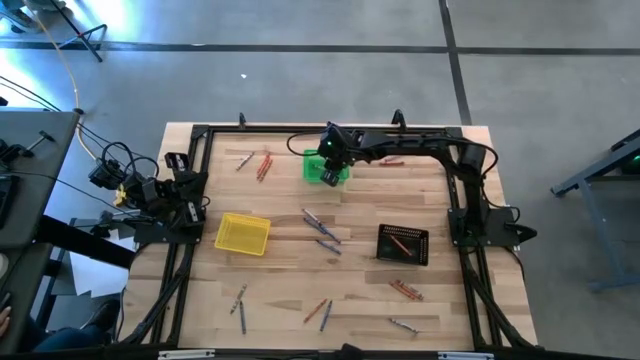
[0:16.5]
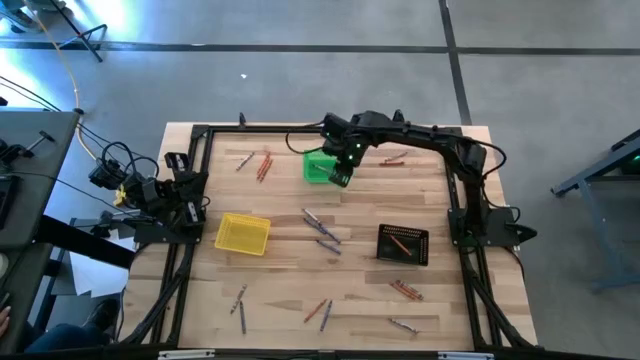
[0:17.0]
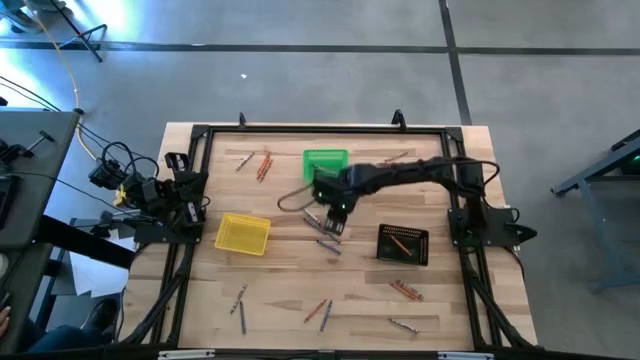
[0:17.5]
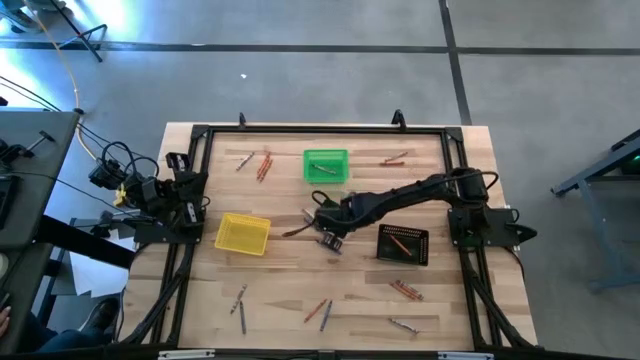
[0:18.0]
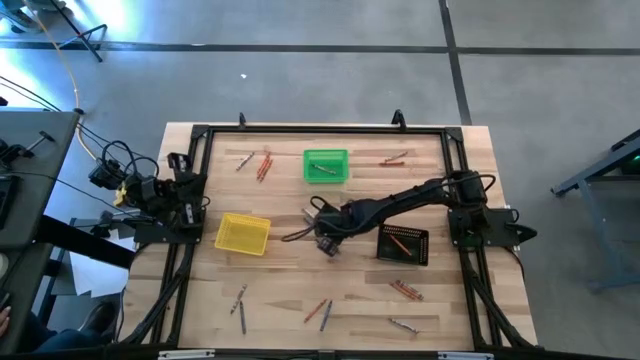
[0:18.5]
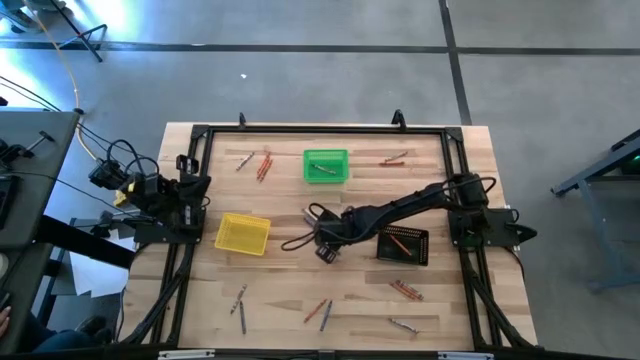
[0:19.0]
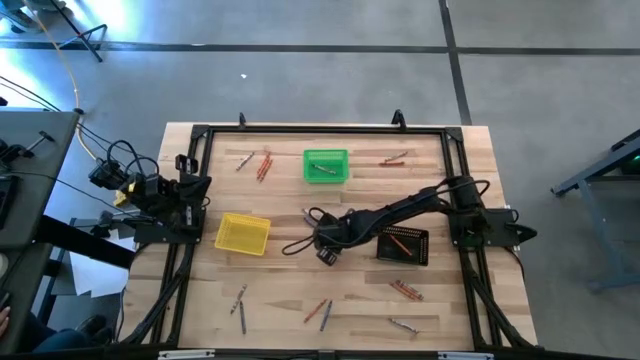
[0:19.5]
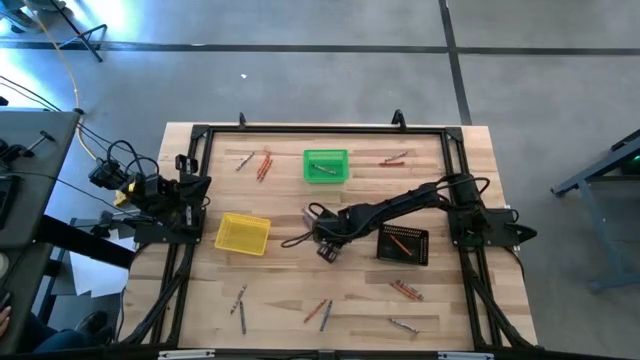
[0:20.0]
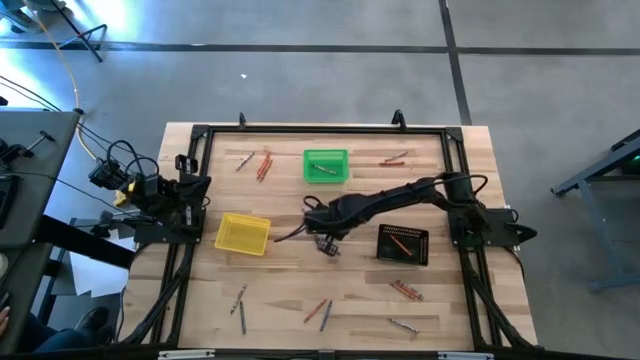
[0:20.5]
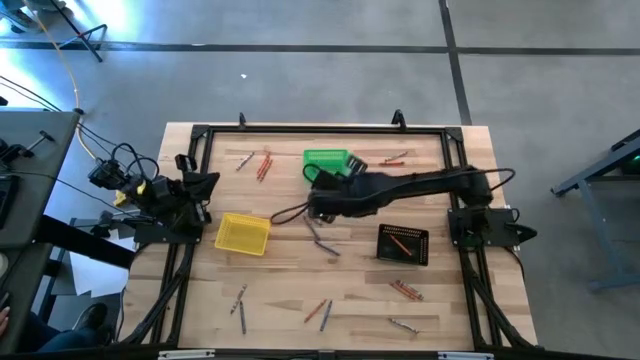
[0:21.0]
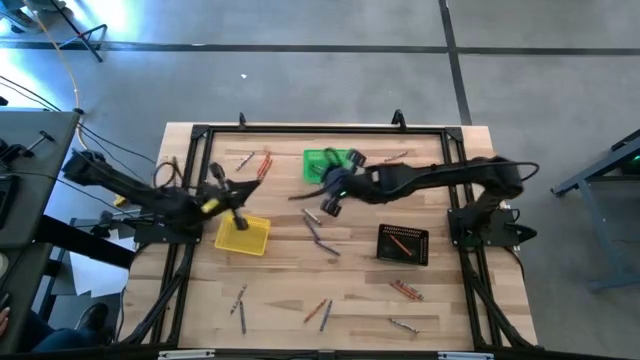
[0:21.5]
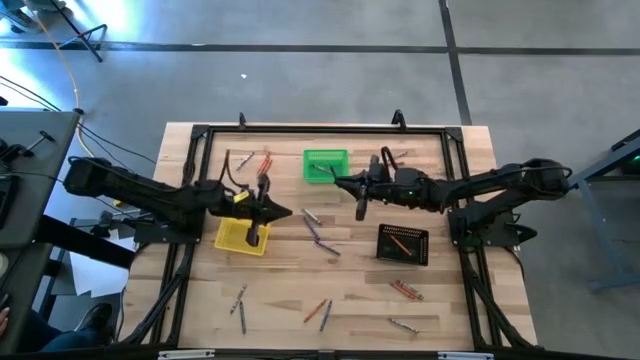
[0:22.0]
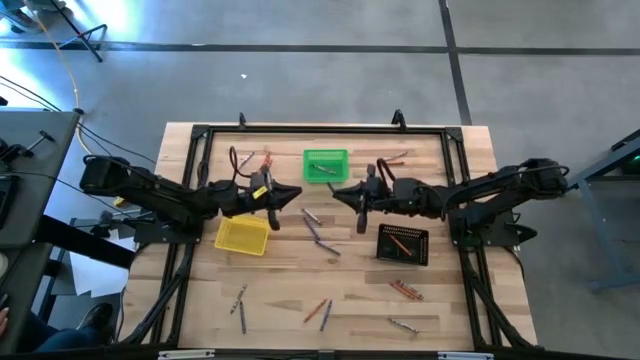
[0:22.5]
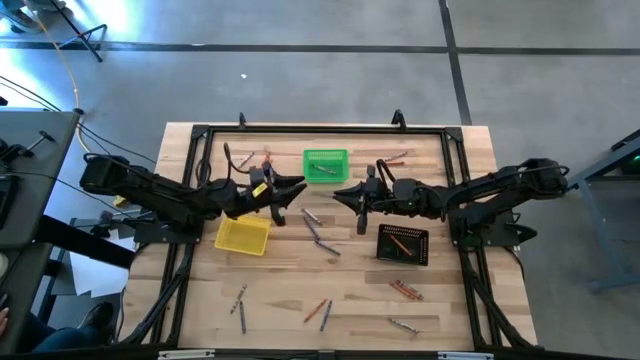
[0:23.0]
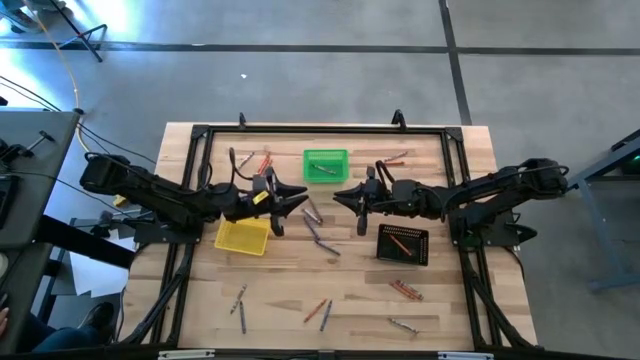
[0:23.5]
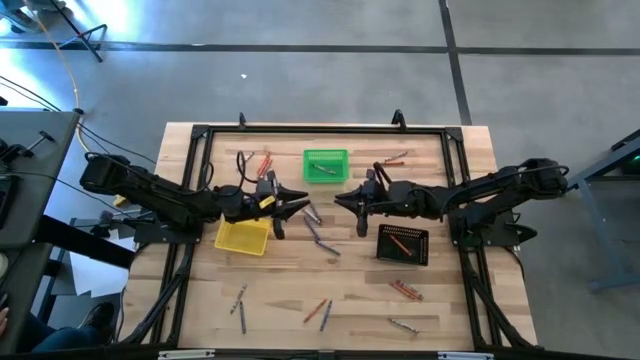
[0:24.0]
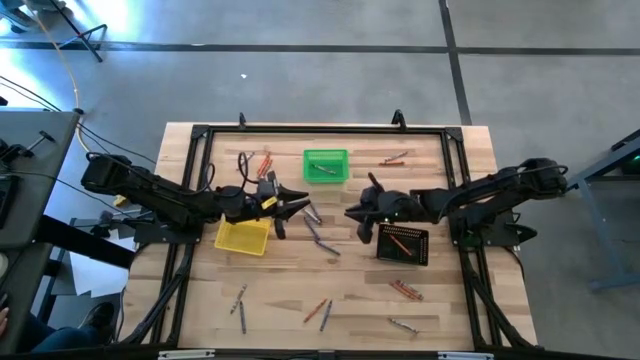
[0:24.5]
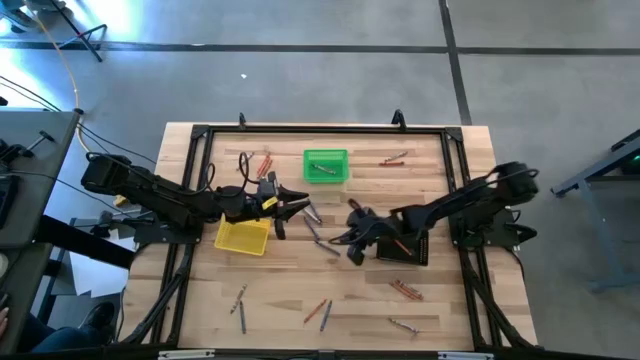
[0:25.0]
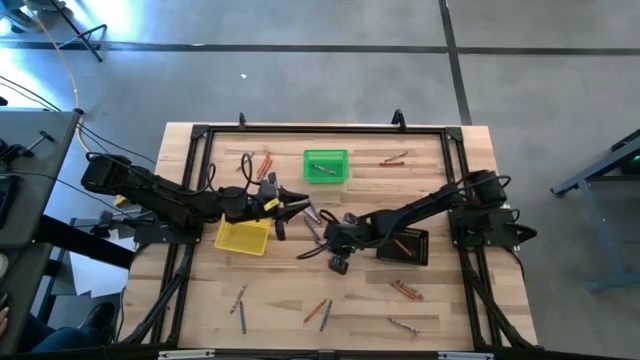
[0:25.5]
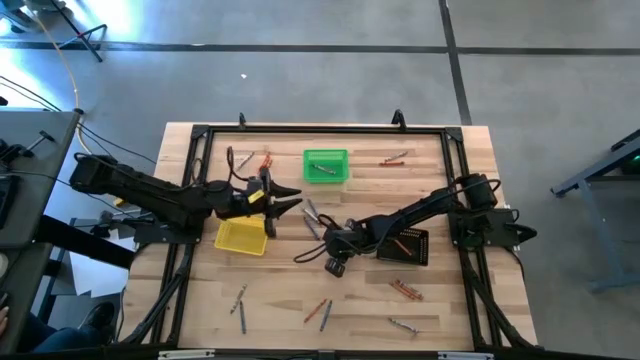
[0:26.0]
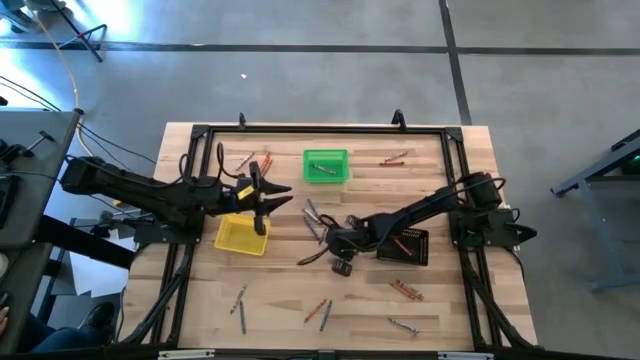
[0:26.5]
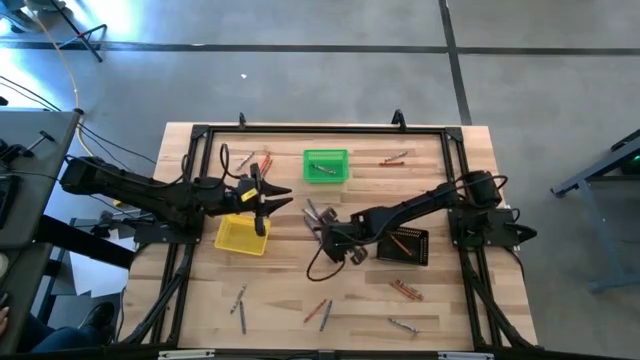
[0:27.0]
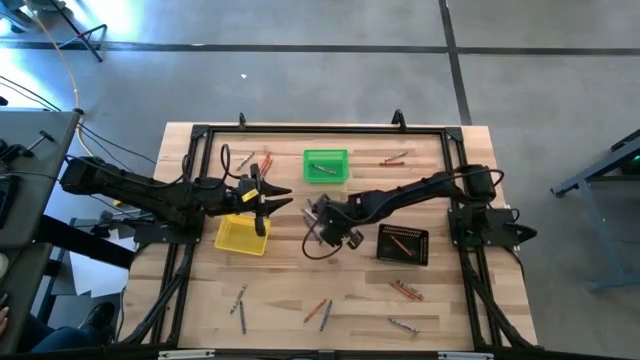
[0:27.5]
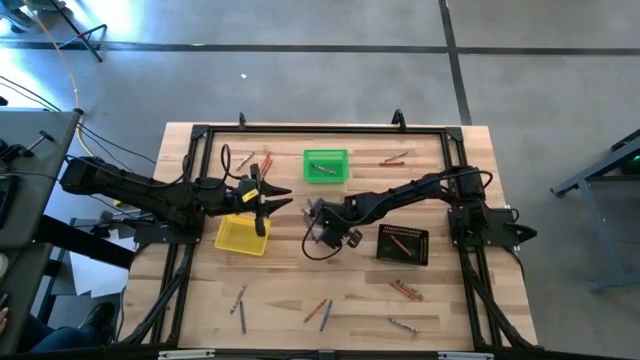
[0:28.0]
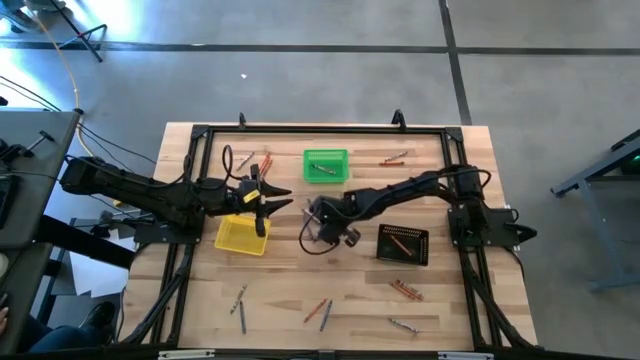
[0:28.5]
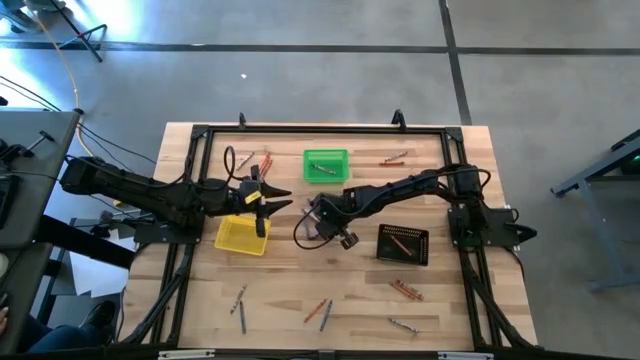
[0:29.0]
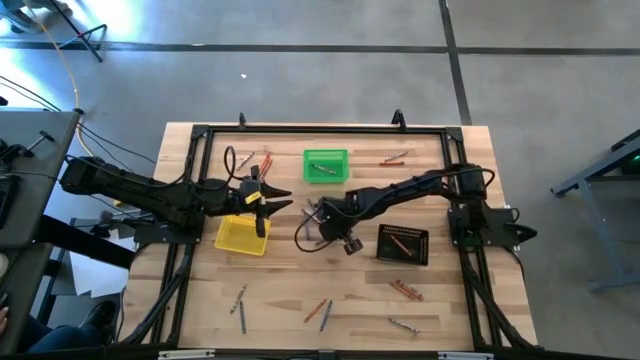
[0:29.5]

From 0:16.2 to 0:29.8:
Task: Sort crayons
Put the blue crayon into the yellow basket

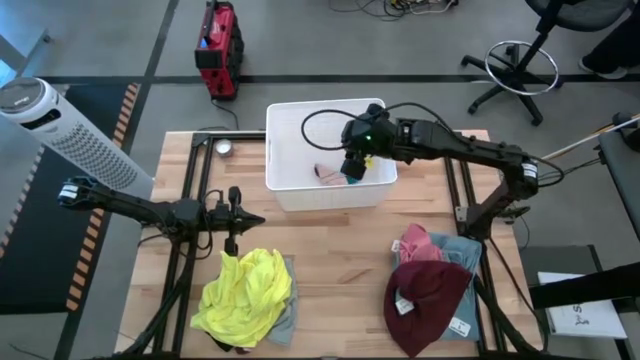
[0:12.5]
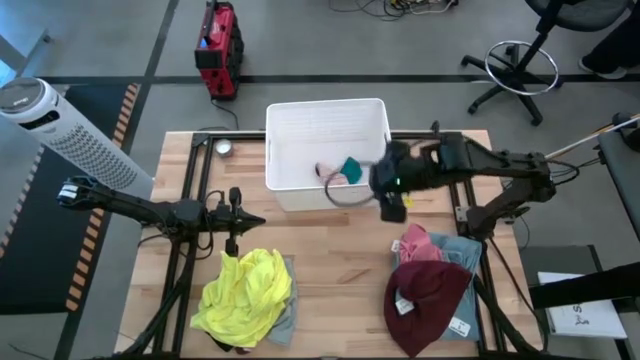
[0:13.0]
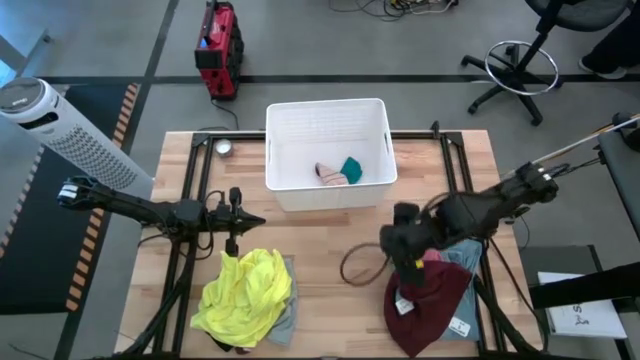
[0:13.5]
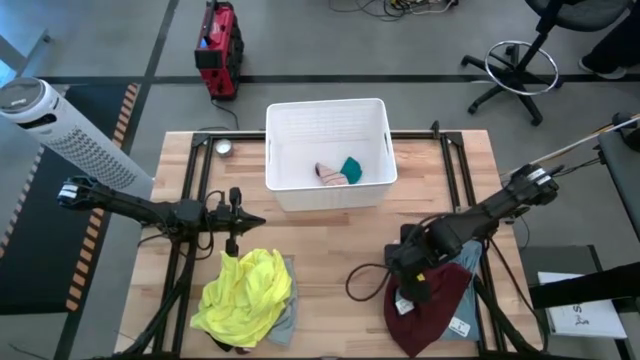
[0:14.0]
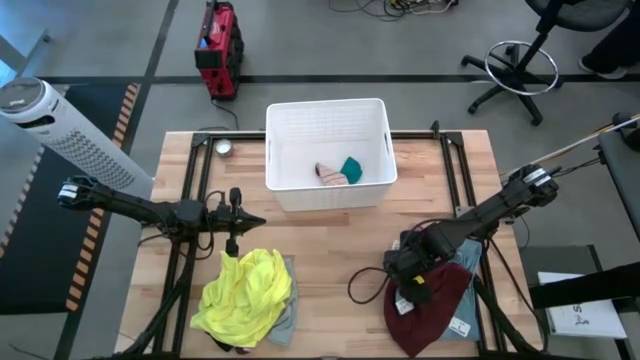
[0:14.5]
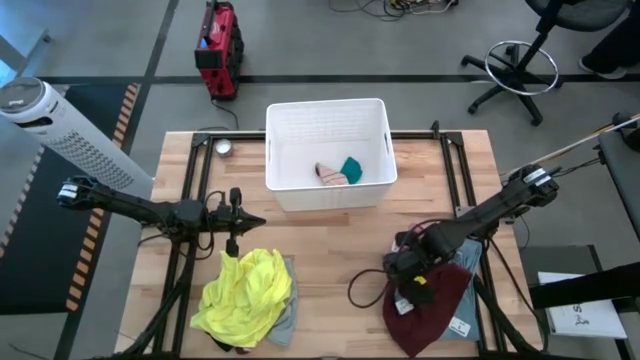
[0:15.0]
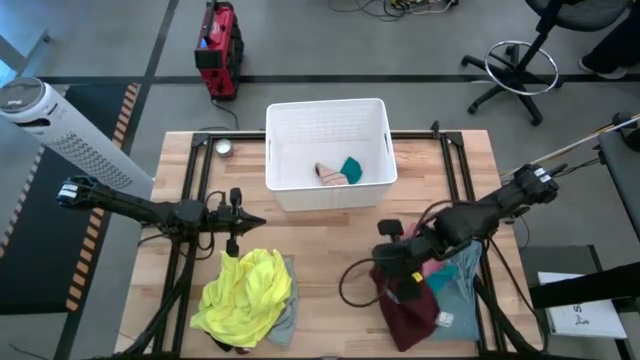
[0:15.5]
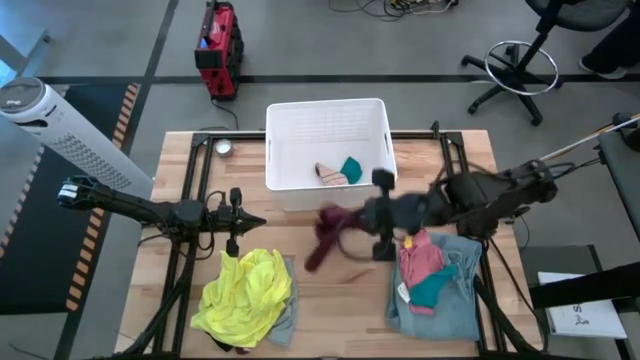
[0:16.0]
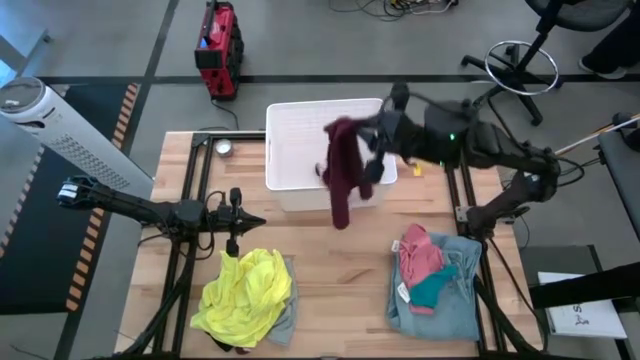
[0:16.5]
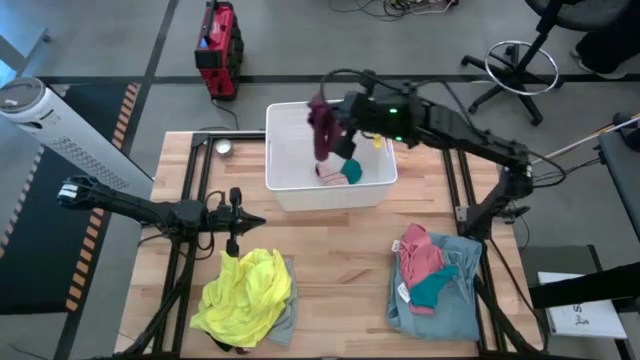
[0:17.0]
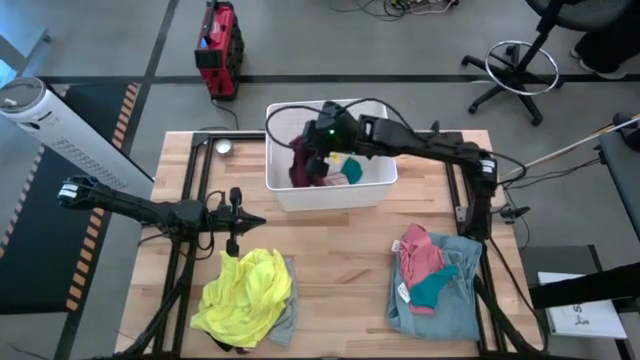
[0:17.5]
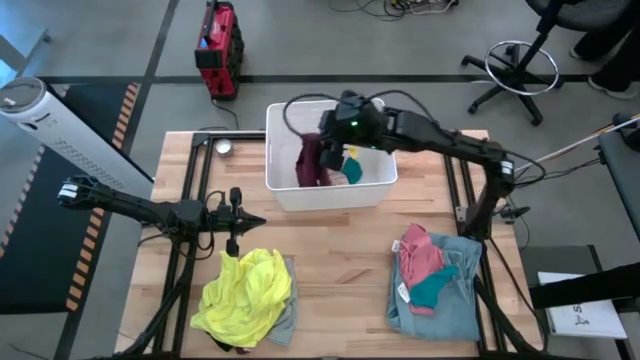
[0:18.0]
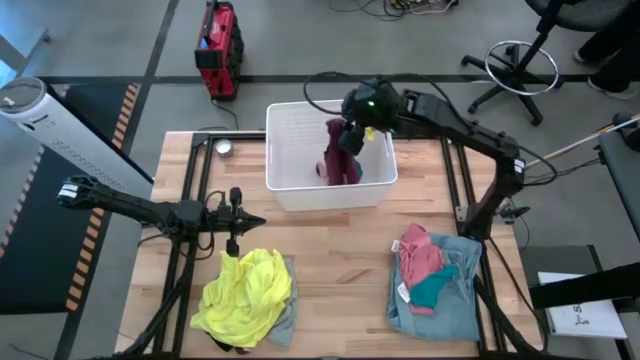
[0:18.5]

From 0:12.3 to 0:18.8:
Task: Sort clothes
Put the red underwear into the white laundry bin

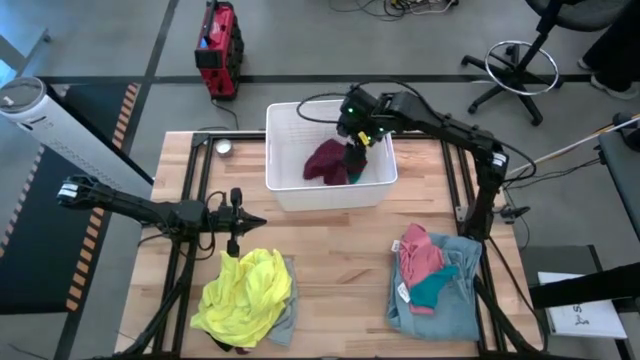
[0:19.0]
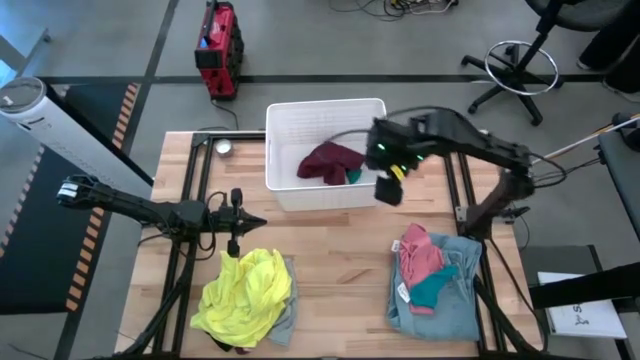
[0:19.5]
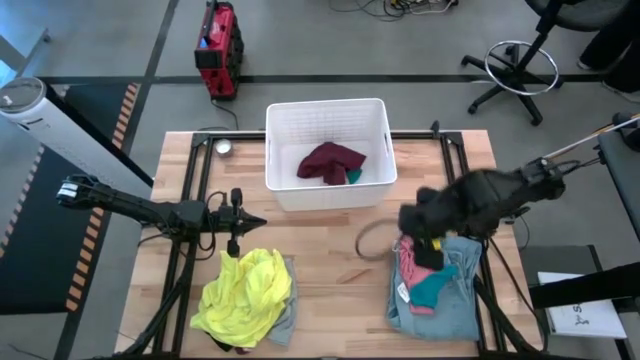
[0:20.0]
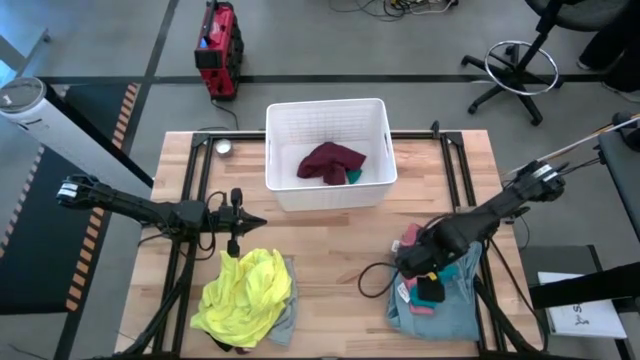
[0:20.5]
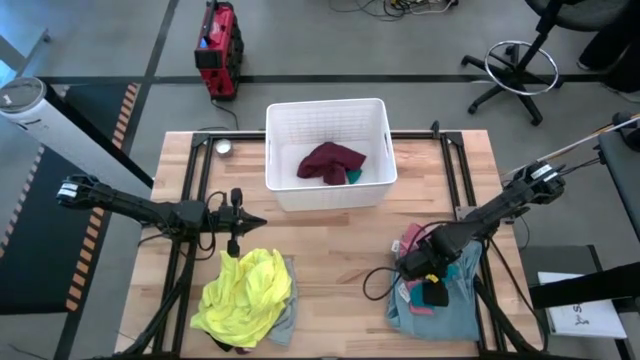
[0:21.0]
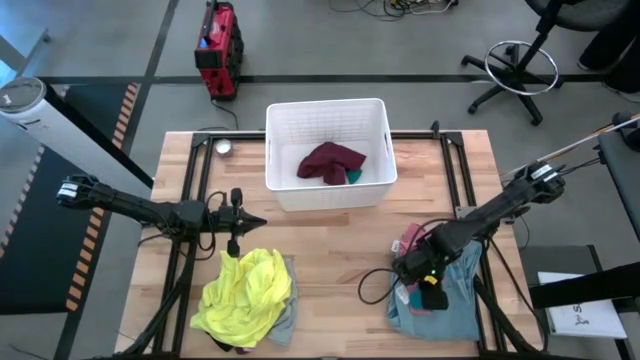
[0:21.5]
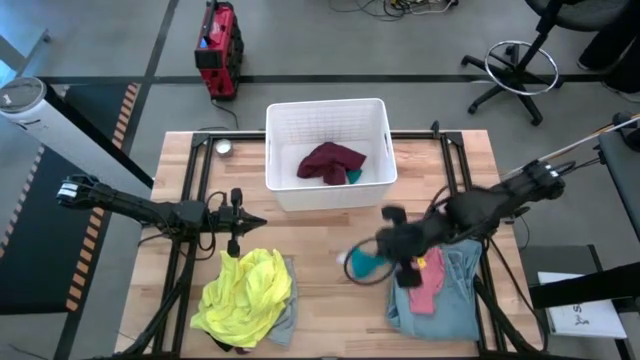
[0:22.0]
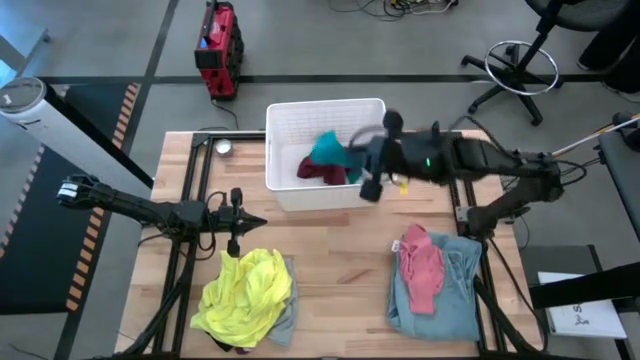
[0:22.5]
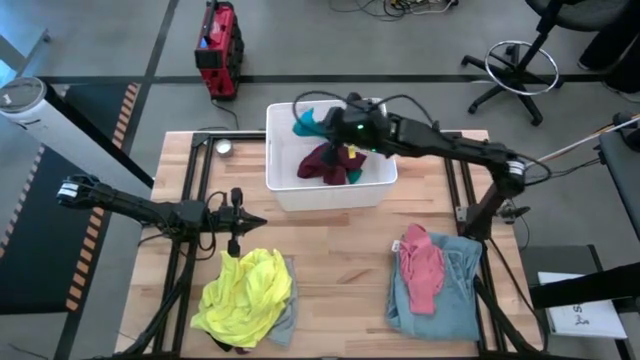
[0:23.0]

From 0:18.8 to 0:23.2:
Put the blue sock into the white laundry bin
